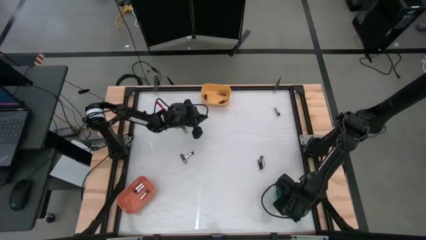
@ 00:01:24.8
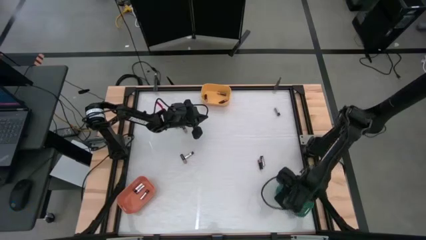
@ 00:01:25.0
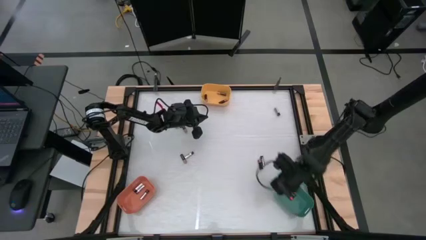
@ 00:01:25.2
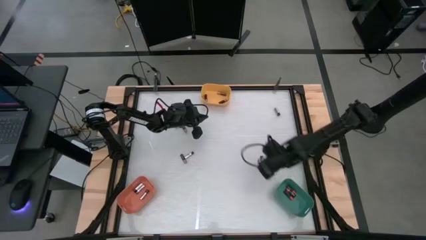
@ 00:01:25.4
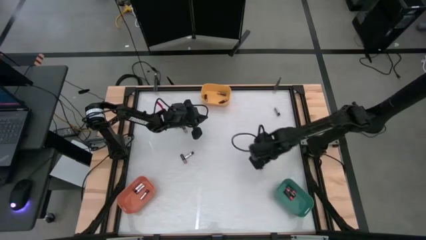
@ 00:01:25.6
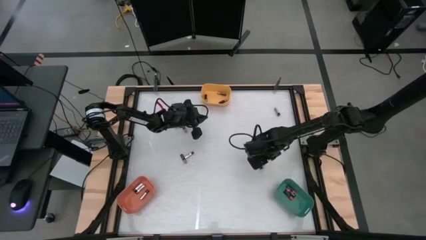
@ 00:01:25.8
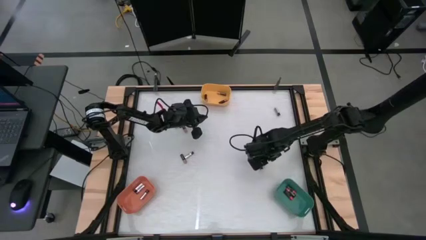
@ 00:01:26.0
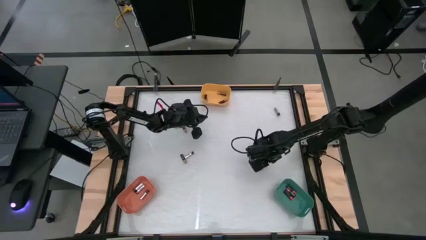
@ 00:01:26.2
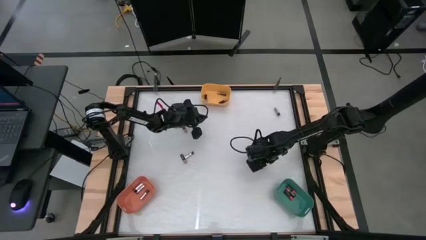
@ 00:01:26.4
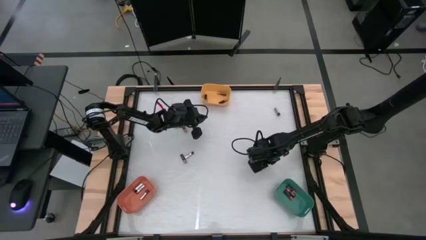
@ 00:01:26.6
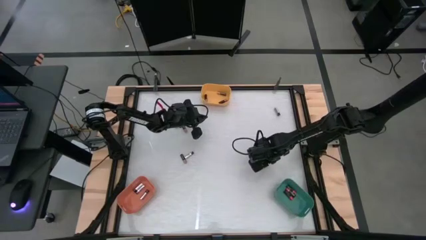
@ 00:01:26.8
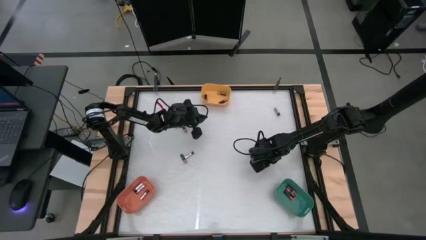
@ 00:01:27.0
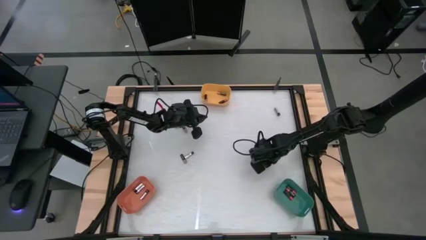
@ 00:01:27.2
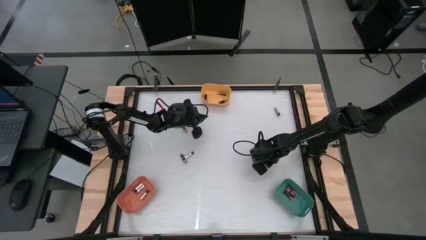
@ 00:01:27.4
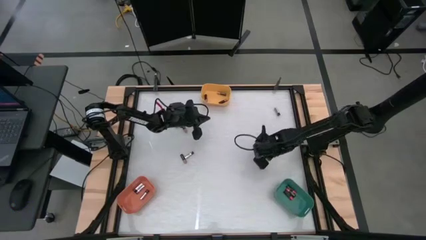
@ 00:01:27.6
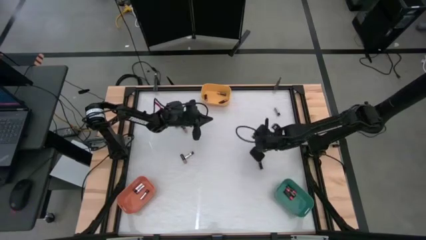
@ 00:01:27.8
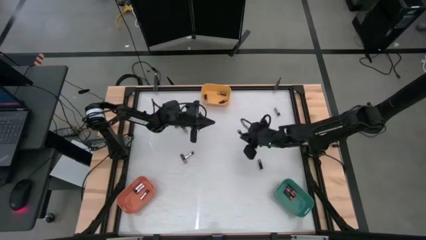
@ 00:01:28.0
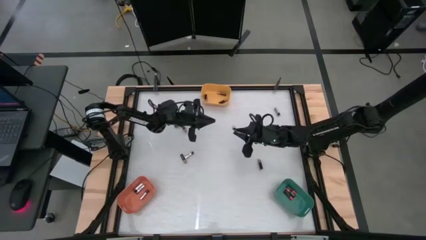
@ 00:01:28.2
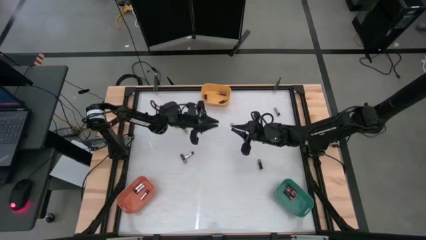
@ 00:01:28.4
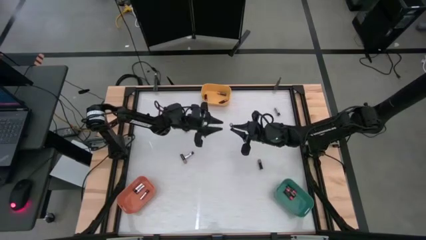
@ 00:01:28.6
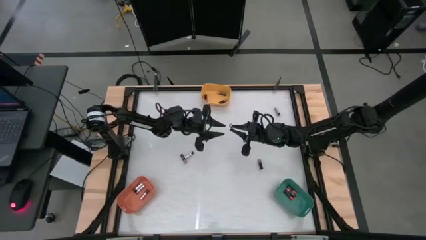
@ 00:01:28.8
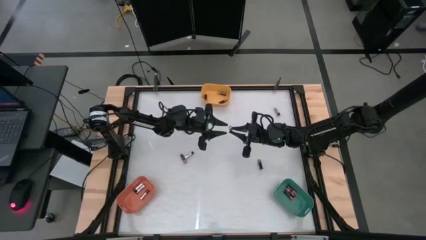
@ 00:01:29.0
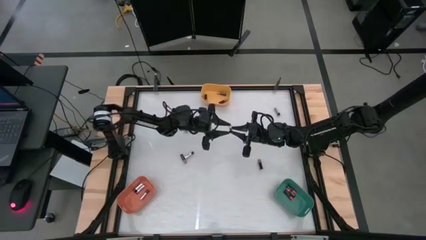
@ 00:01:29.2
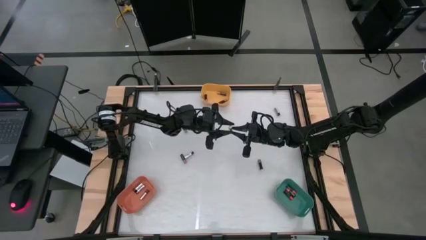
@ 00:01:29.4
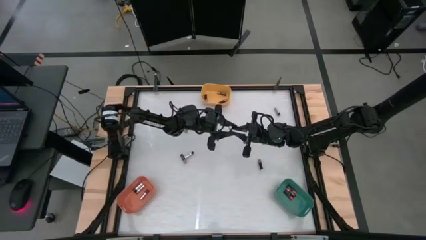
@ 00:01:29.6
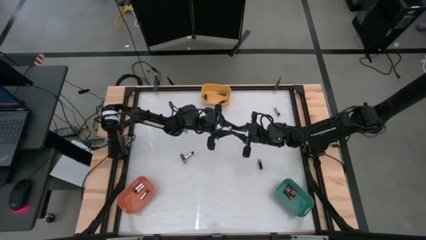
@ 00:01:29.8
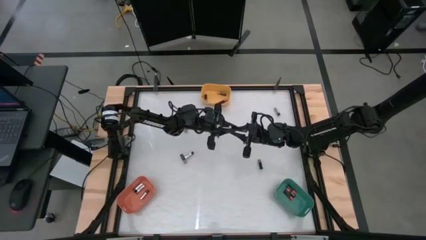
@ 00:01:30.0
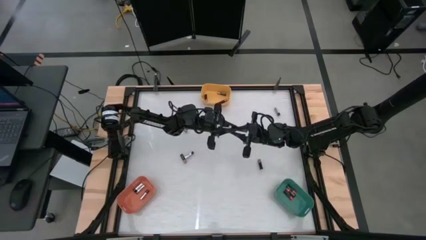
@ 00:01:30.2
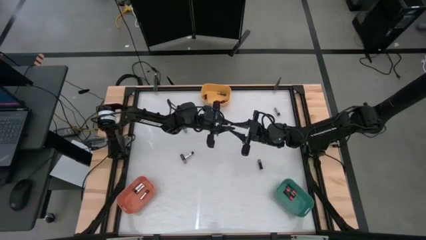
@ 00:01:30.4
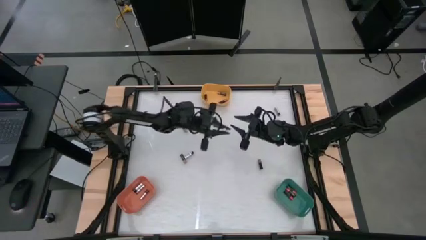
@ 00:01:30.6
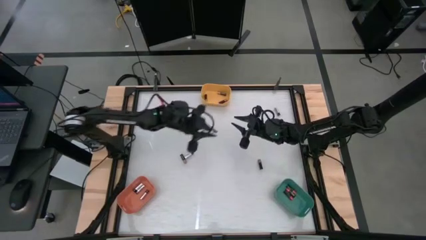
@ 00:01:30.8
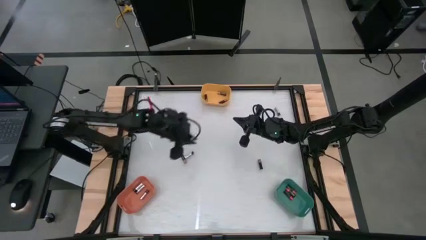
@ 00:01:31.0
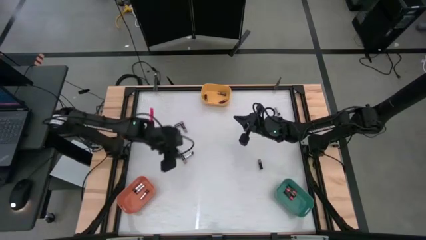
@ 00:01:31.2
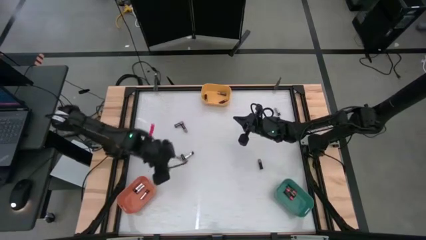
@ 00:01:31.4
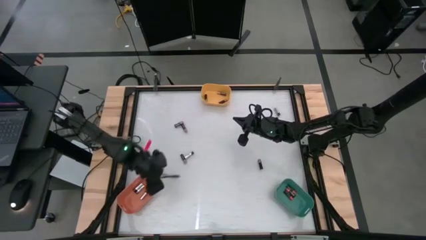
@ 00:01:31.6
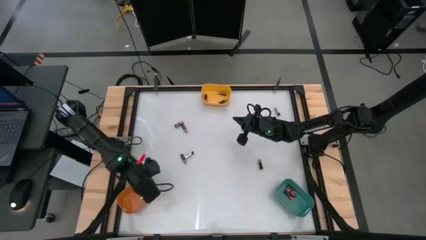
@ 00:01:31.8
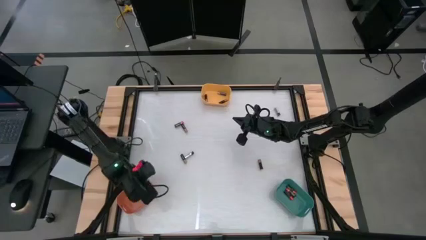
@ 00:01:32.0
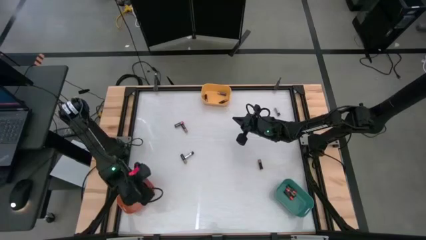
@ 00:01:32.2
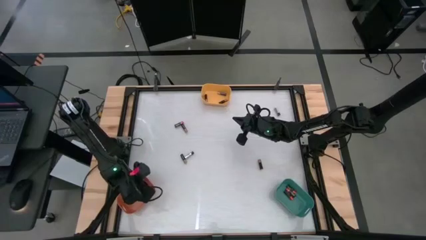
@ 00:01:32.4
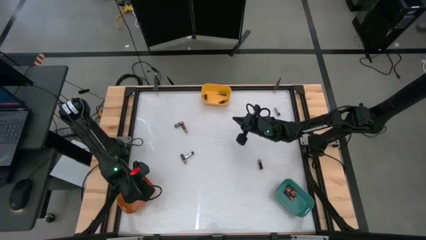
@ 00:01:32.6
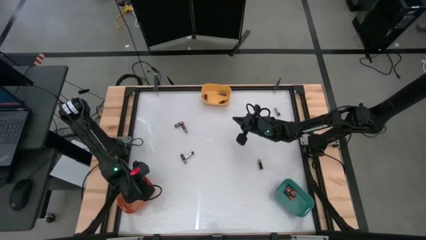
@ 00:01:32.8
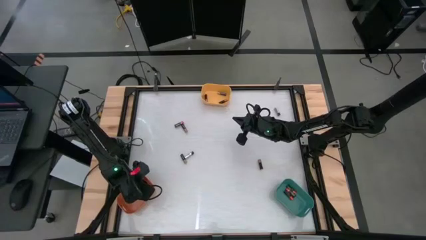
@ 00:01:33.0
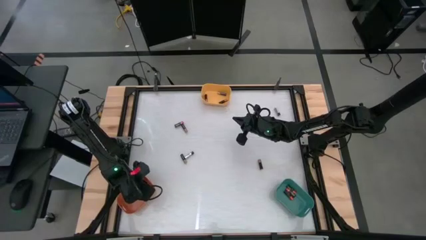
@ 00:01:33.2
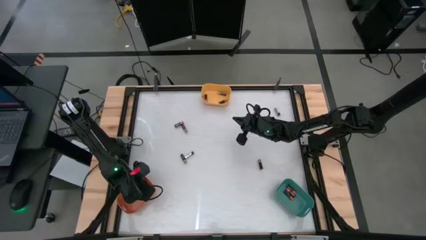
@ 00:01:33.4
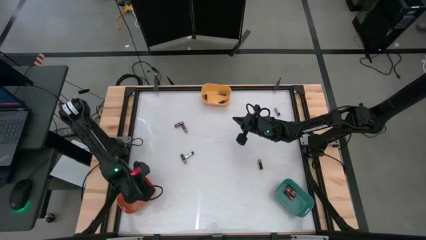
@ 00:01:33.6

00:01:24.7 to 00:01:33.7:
Task: Sort batteries
Put the silver battery into the orange bin

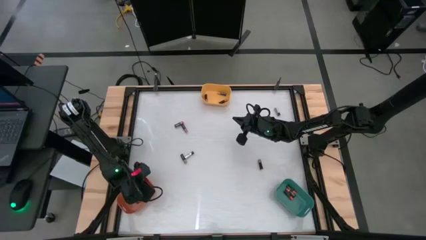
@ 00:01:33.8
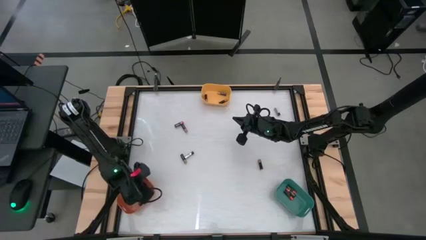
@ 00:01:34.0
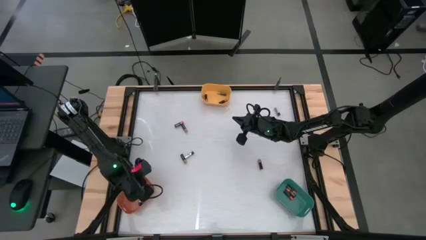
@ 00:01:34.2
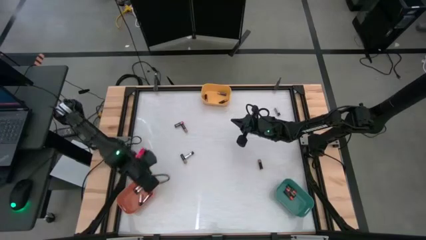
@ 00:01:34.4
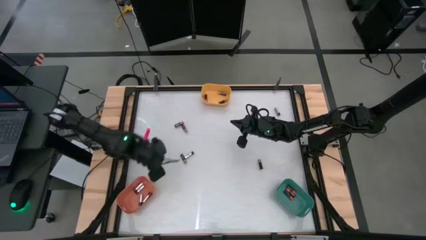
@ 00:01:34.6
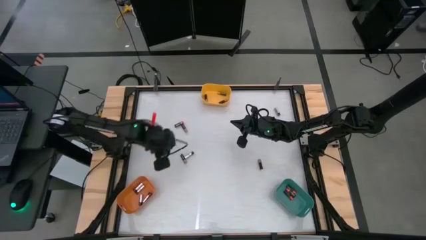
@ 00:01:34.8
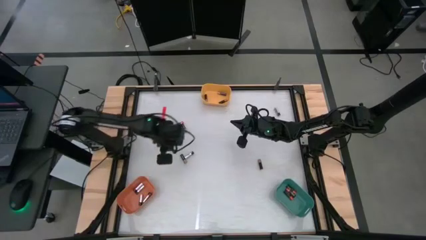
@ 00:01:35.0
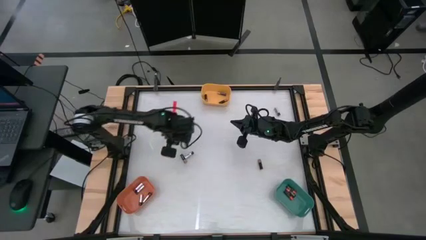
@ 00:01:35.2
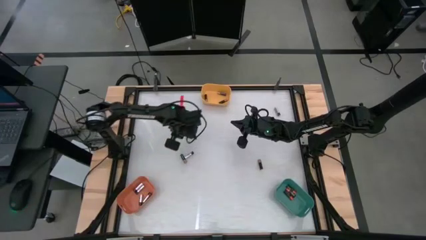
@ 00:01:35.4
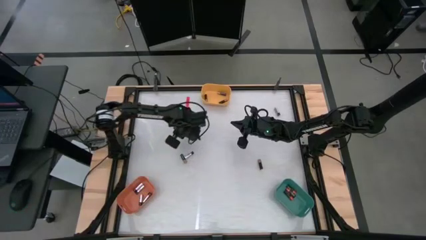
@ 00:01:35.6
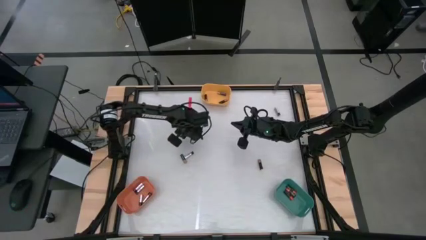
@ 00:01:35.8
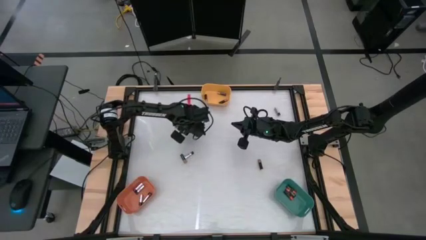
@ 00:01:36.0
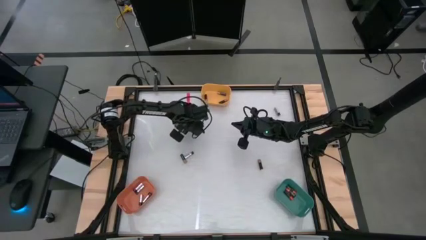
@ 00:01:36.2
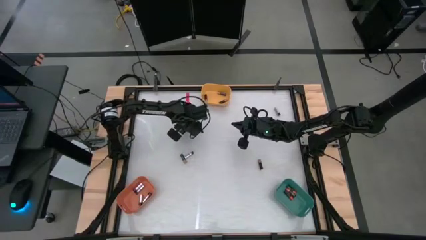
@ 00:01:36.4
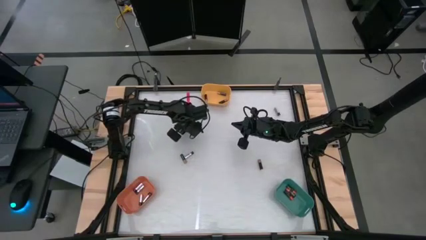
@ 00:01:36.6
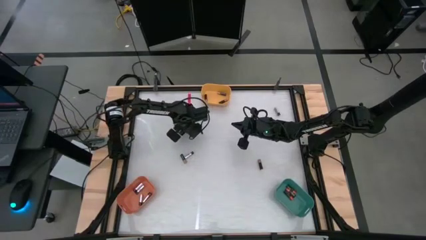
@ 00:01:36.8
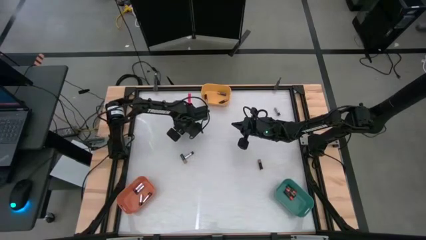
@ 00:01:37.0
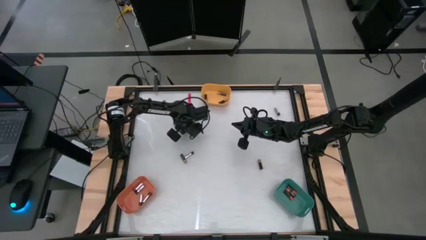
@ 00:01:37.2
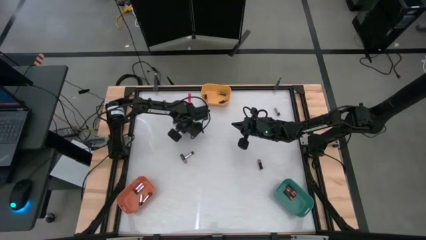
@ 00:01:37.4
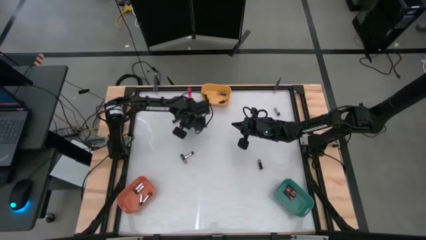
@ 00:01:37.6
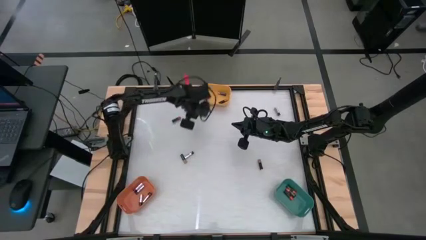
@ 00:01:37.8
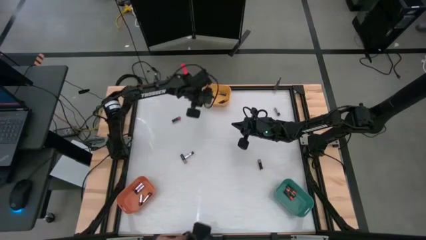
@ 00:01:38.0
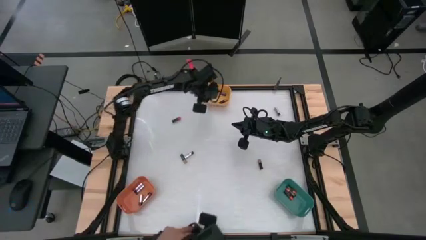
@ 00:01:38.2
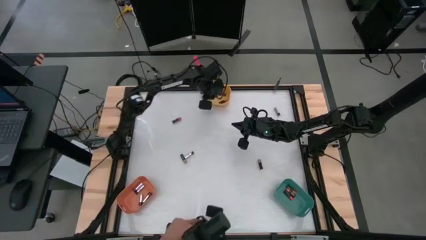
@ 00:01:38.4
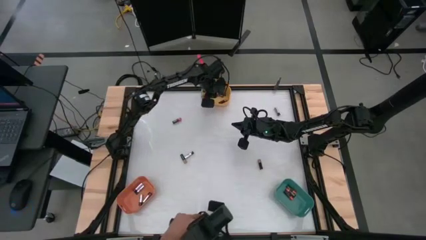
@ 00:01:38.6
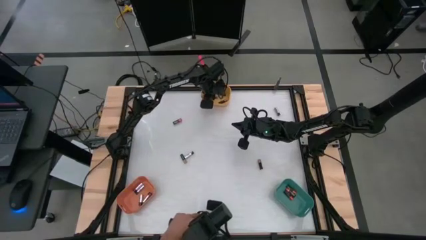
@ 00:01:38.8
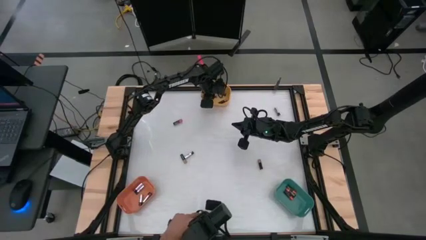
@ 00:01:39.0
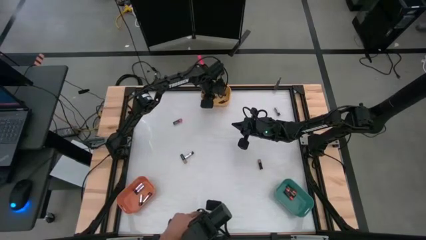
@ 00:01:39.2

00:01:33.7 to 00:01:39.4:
Put the black-brown battery into the yellow bin

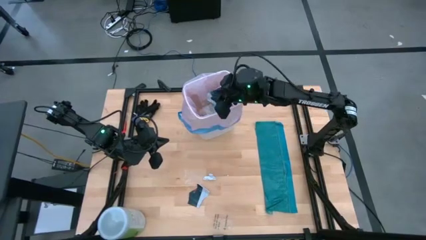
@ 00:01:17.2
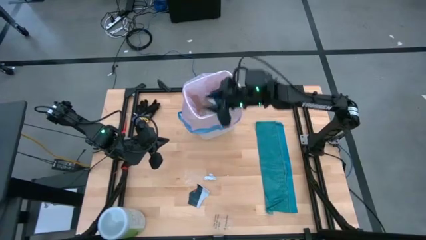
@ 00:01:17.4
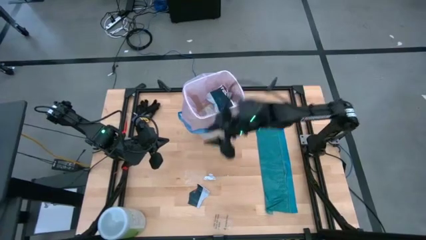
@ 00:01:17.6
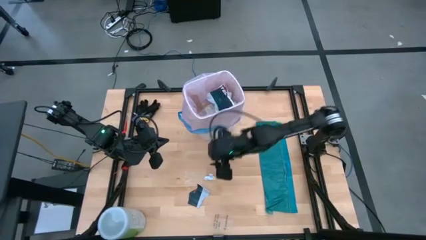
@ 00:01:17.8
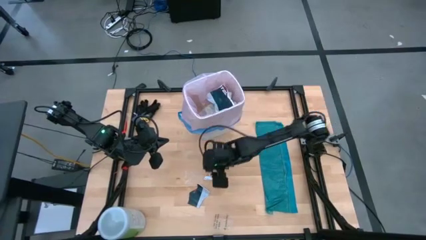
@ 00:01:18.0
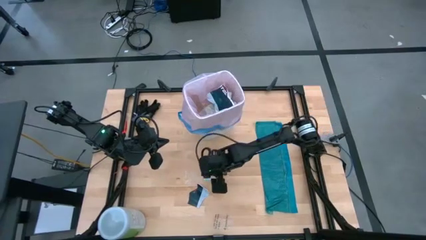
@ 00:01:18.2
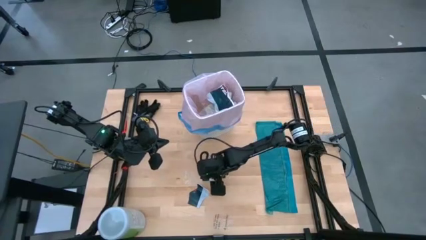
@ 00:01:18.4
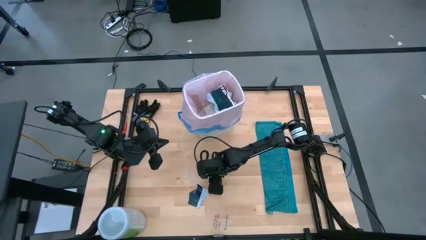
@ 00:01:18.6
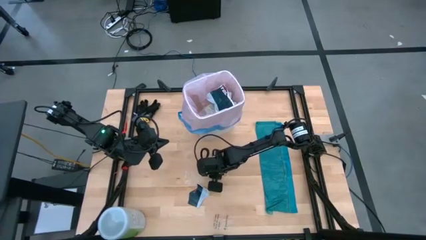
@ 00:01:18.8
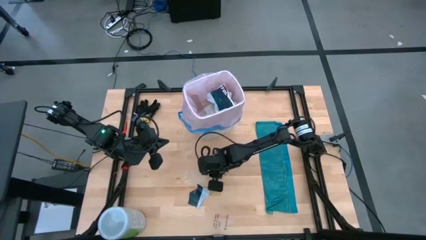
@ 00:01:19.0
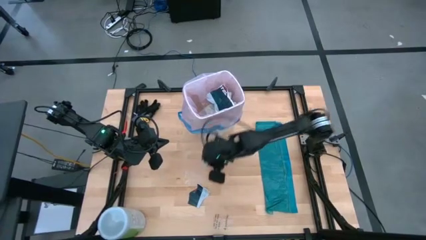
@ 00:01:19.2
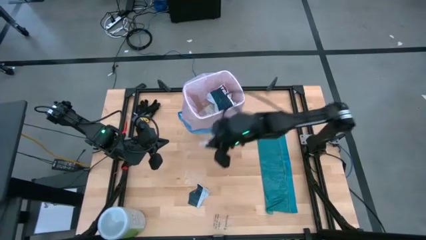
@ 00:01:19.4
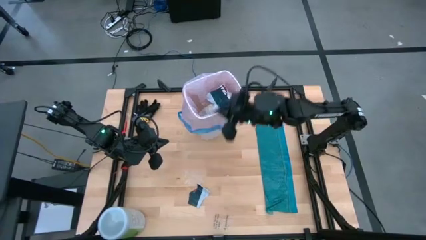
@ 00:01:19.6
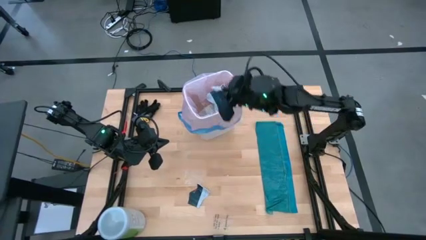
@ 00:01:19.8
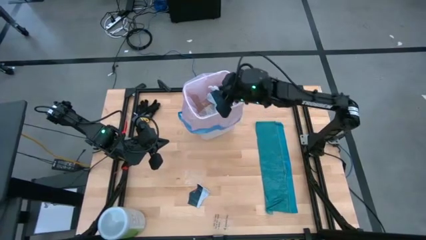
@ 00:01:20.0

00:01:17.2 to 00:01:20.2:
Task: place trash/remove bag and relplace
Put the paper trash into the white trash bin
